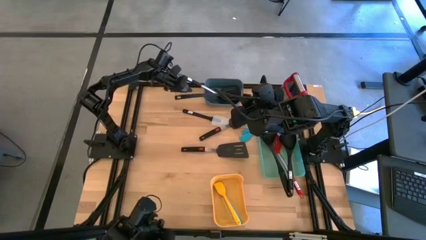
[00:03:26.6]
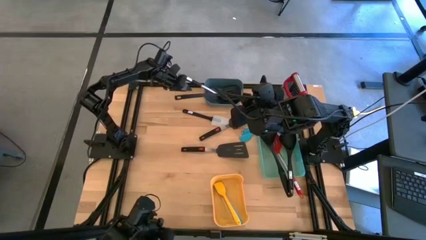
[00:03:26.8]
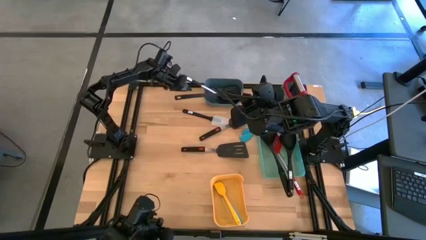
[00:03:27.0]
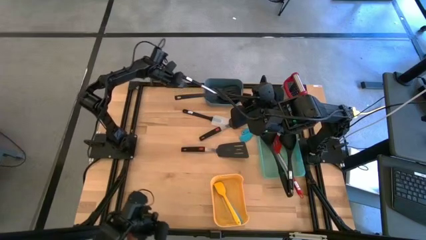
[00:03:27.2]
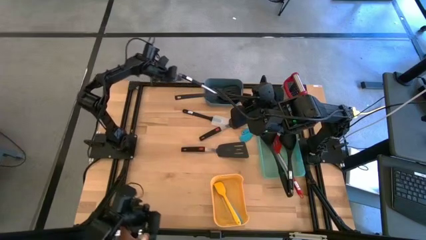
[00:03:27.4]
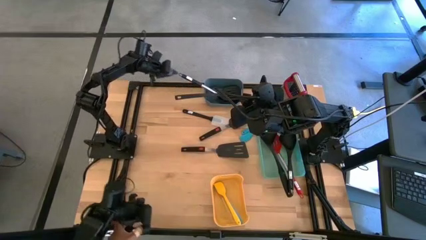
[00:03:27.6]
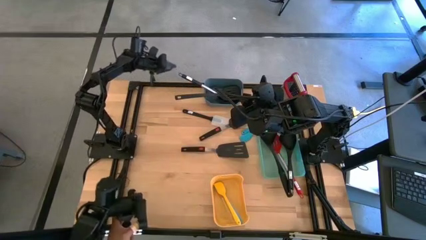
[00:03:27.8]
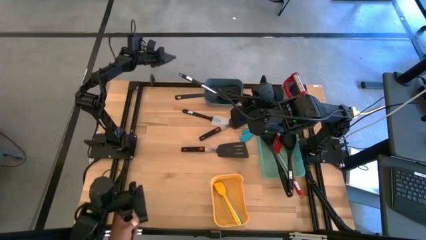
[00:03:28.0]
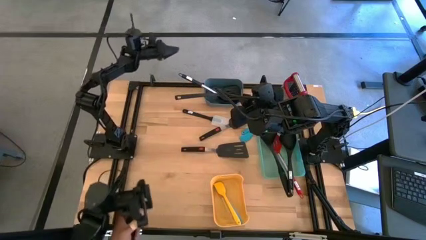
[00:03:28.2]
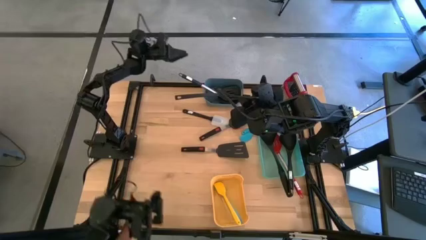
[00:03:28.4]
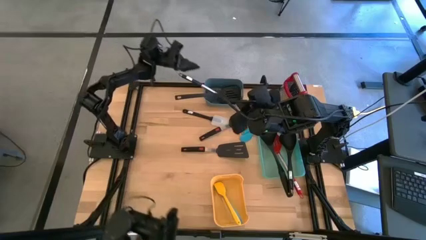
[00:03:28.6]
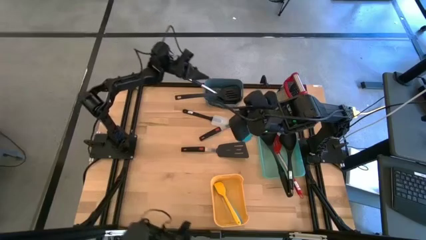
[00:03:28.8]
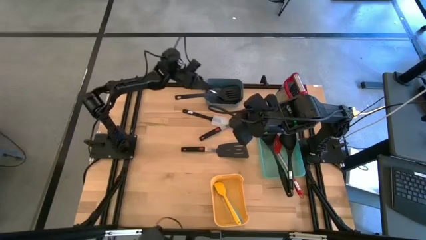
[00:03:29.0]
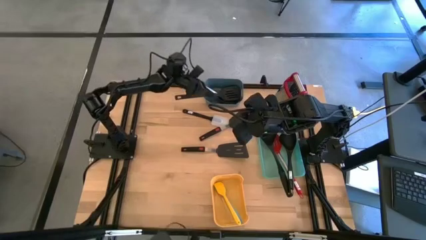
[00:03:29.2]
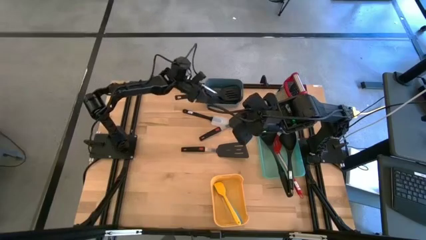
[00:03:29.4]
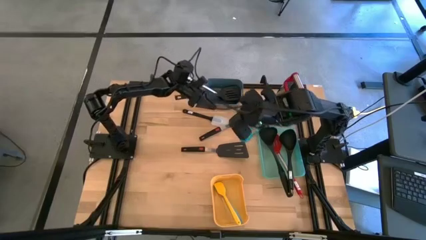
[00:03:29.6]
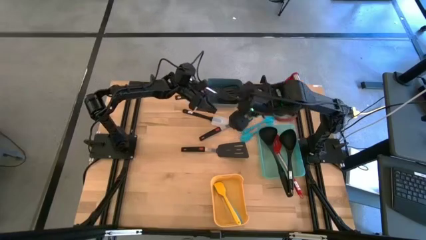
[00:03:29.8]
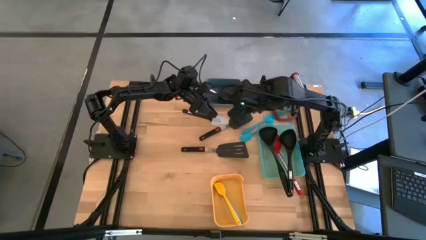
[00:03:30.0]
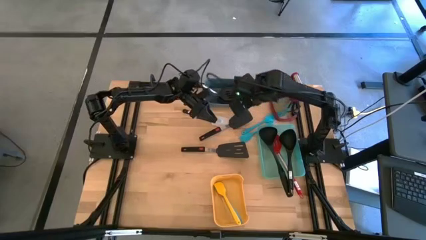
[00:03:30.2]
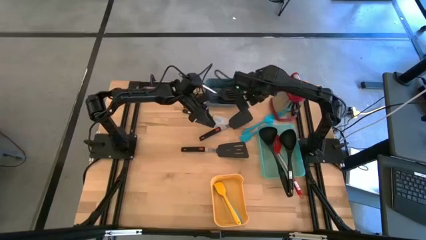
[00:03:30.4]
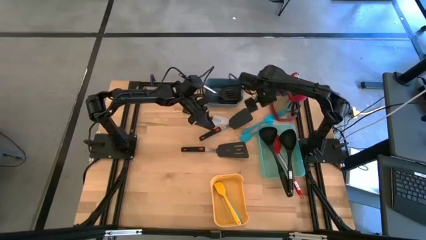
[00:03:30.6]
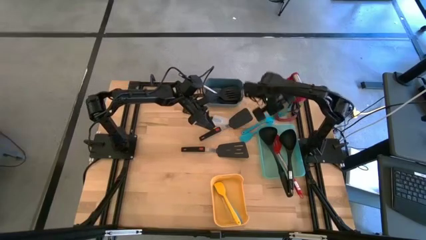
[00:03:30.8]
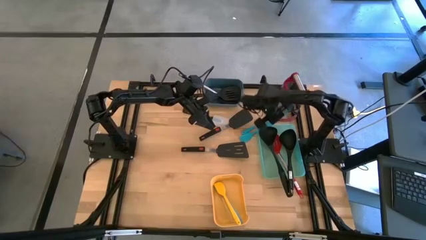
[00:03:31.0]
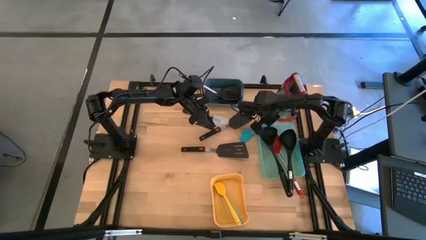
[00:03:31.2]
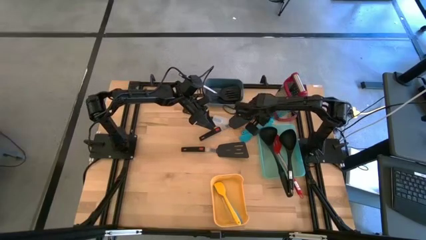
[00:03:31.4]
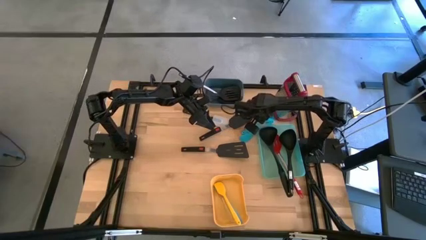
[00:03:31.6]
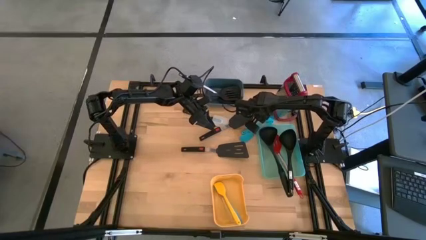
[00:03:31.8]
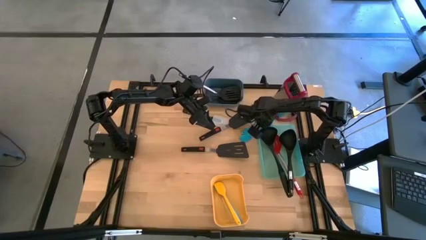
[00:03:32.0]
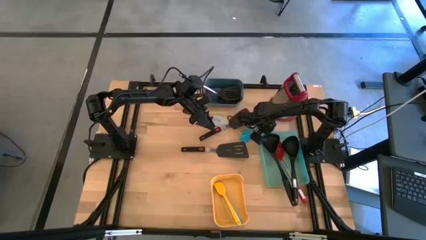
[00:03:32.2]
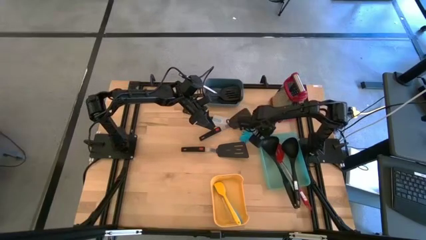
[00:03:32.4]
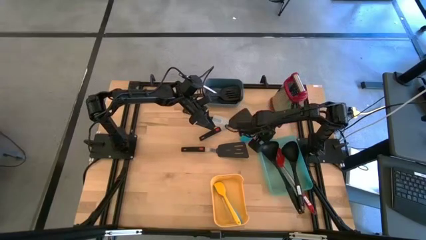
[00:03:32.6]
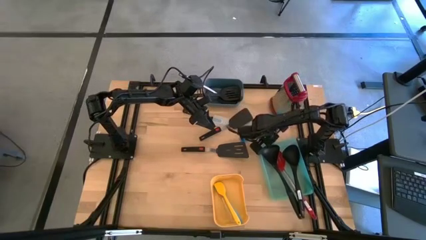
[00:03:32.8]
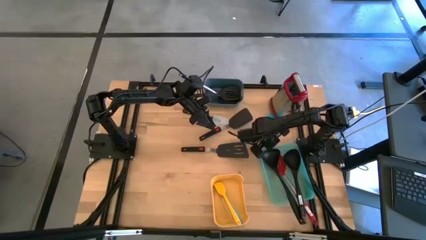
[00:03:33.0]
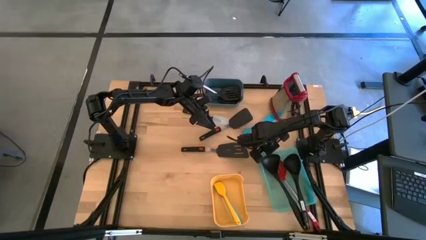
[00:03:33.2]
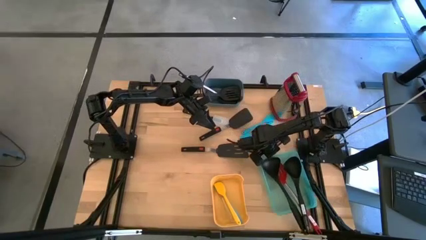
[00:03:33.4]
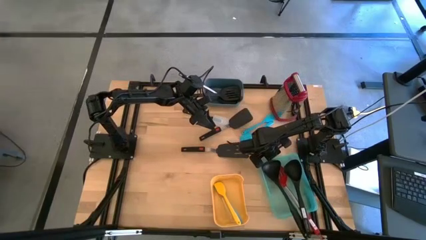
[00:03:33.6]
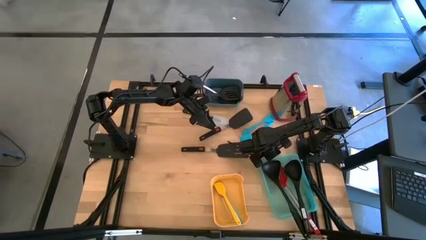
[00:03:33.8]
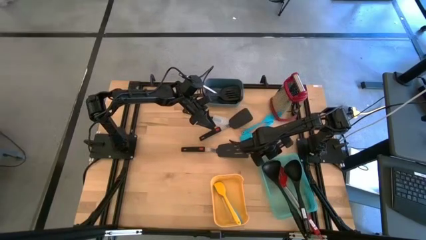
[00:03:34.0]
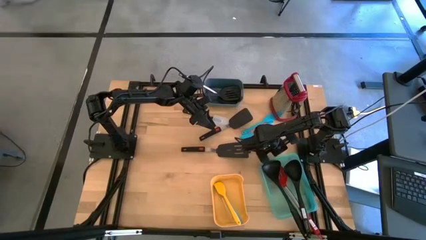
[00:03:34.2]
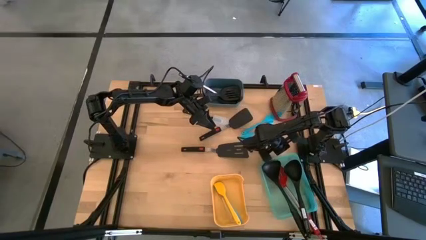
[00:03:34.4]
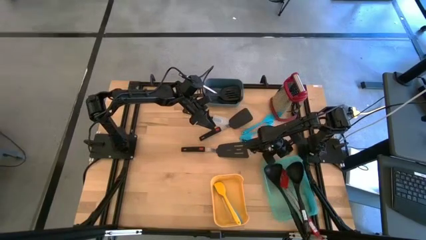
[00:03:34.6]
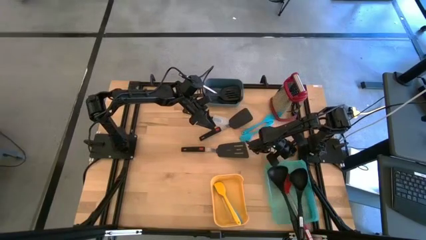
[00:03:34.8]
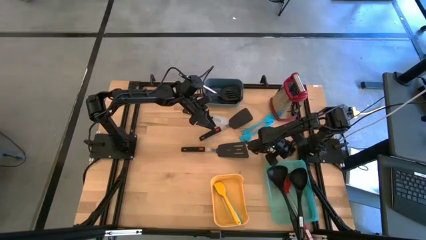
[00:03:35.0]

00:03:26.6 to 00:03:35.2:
Task: Pick & Place Kitchen Items
Adjust the green bin

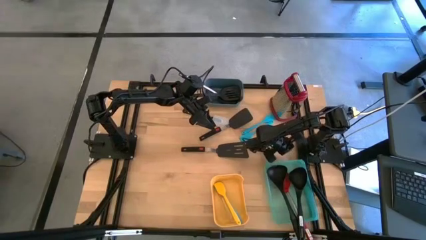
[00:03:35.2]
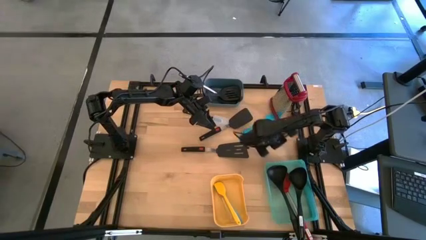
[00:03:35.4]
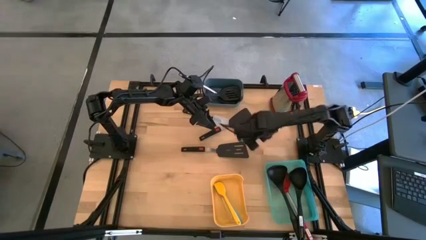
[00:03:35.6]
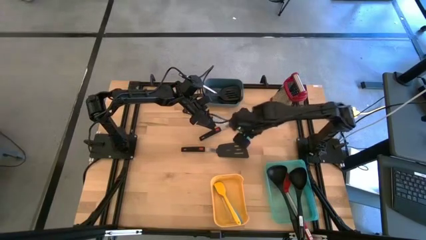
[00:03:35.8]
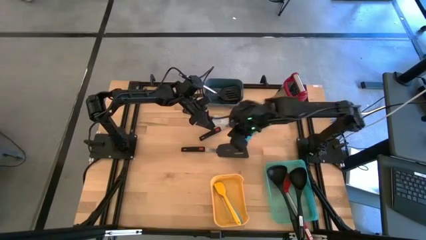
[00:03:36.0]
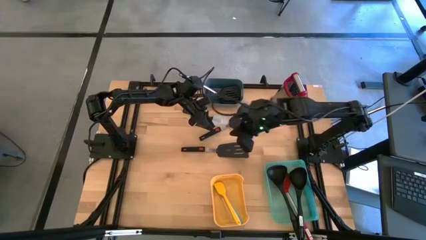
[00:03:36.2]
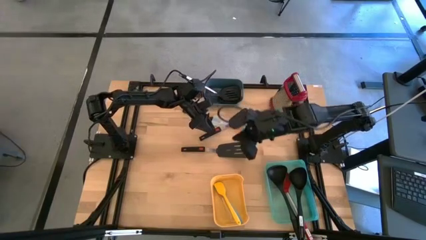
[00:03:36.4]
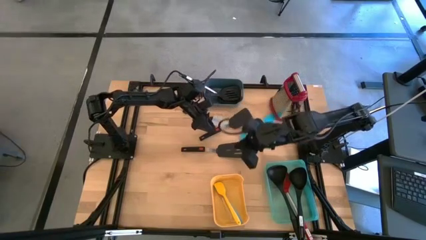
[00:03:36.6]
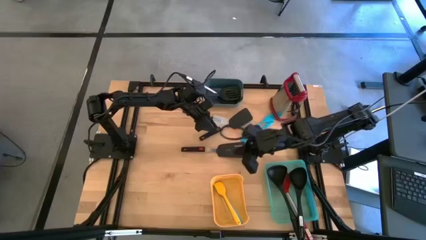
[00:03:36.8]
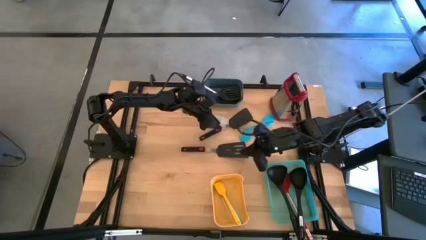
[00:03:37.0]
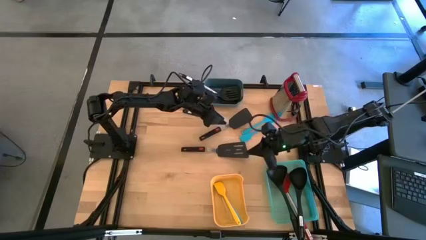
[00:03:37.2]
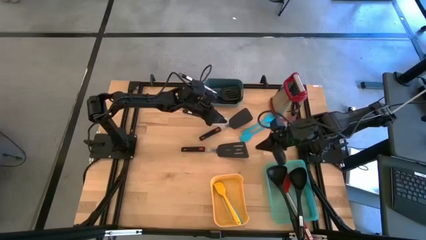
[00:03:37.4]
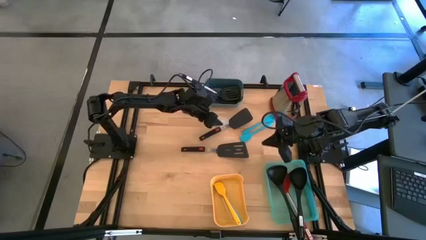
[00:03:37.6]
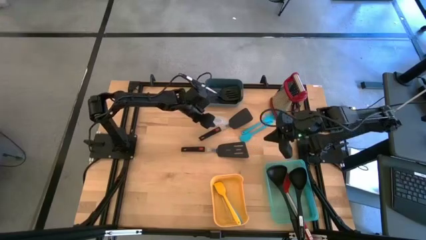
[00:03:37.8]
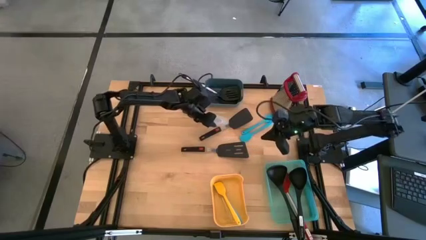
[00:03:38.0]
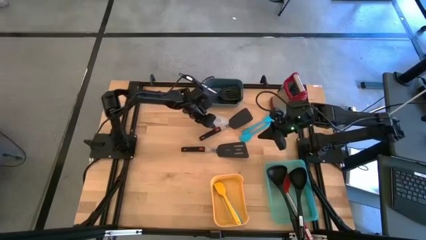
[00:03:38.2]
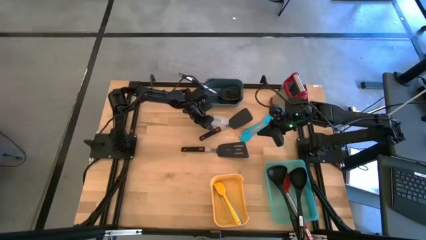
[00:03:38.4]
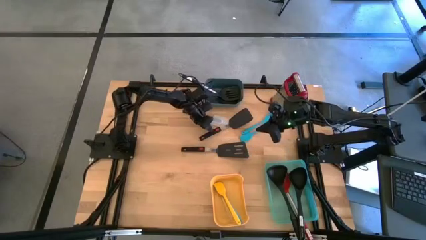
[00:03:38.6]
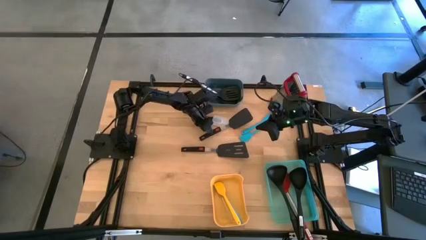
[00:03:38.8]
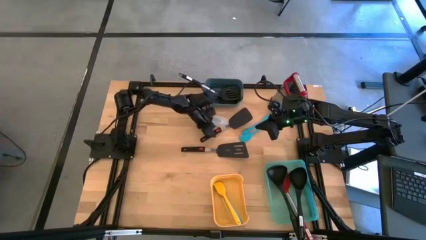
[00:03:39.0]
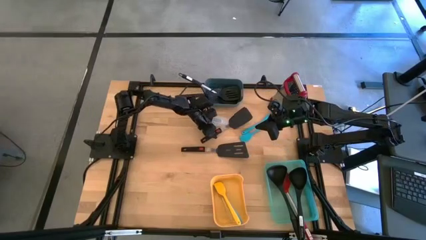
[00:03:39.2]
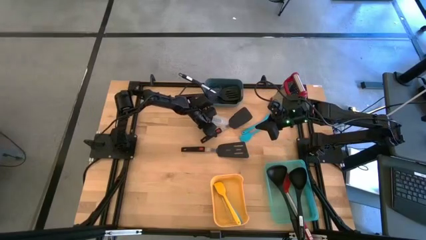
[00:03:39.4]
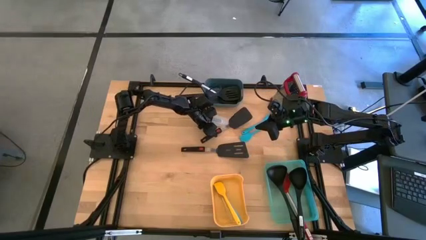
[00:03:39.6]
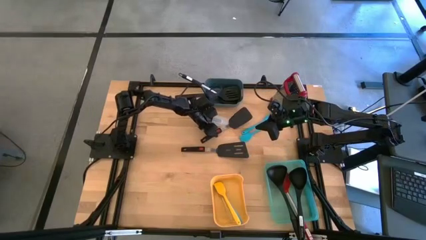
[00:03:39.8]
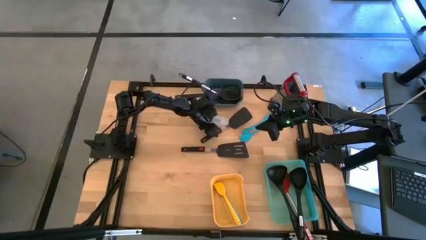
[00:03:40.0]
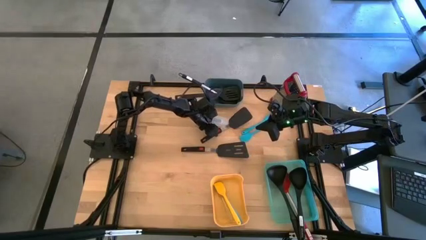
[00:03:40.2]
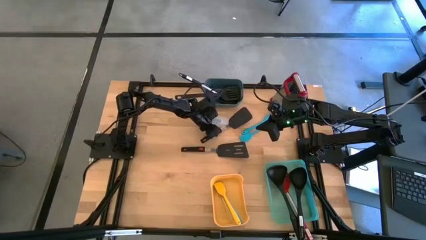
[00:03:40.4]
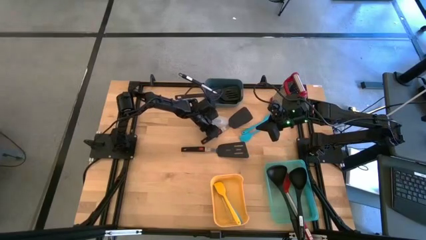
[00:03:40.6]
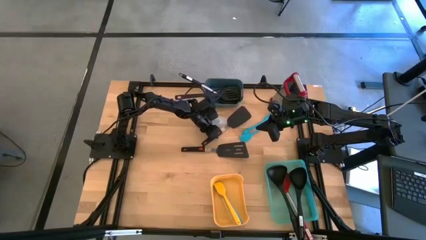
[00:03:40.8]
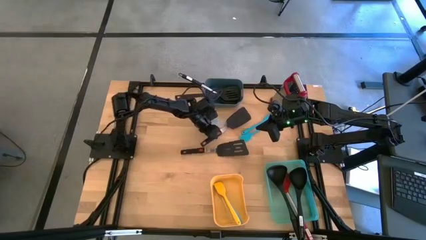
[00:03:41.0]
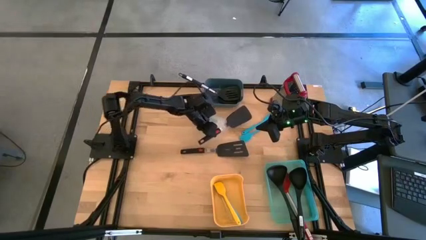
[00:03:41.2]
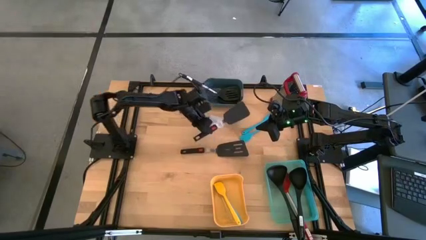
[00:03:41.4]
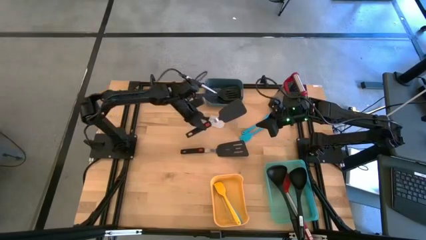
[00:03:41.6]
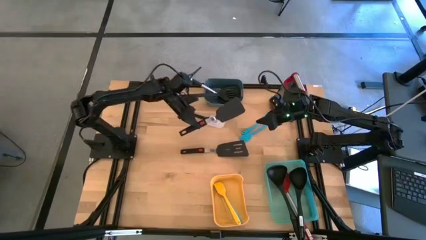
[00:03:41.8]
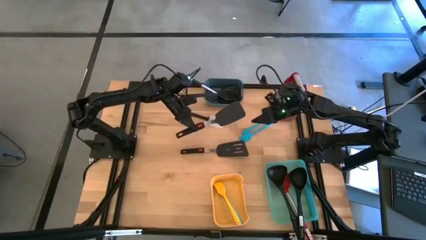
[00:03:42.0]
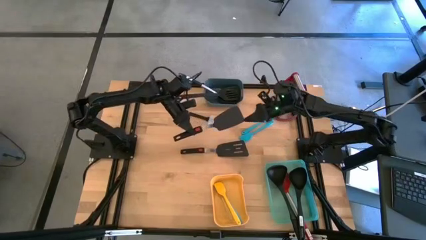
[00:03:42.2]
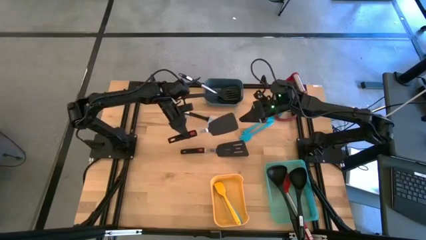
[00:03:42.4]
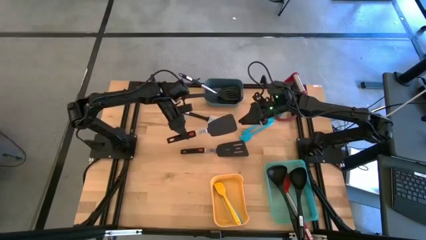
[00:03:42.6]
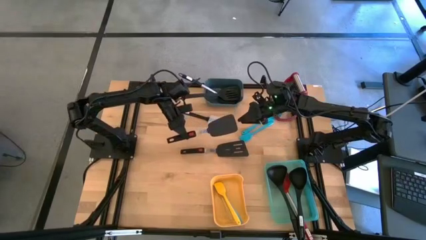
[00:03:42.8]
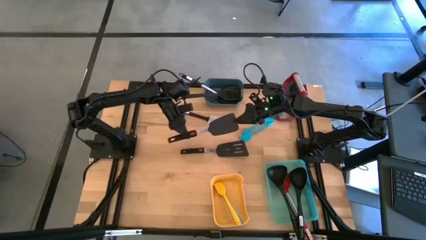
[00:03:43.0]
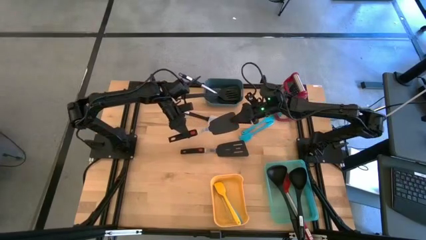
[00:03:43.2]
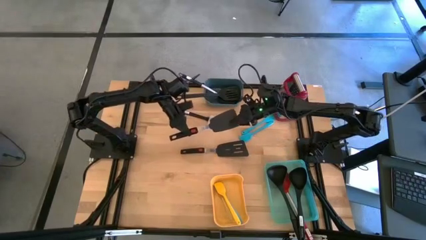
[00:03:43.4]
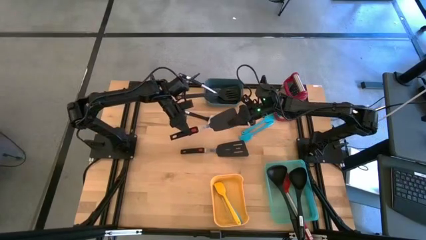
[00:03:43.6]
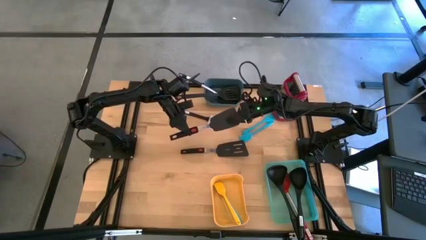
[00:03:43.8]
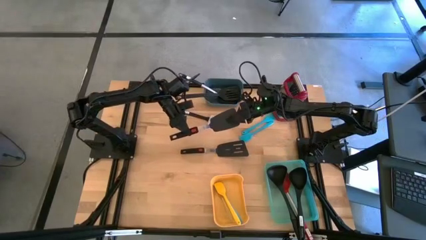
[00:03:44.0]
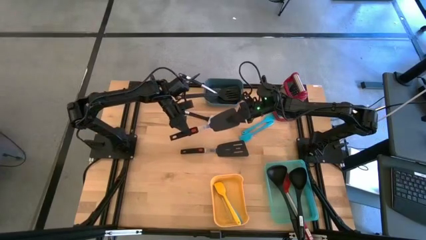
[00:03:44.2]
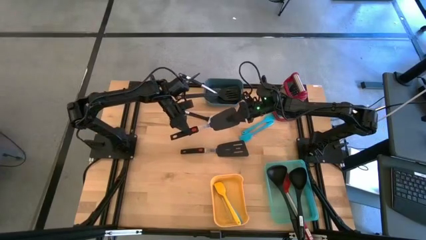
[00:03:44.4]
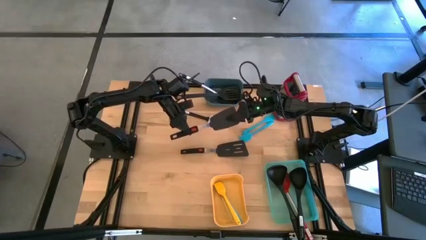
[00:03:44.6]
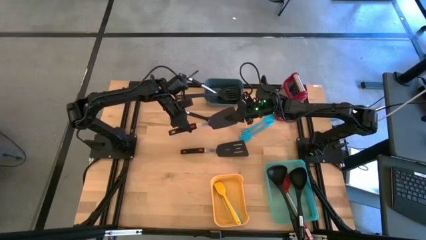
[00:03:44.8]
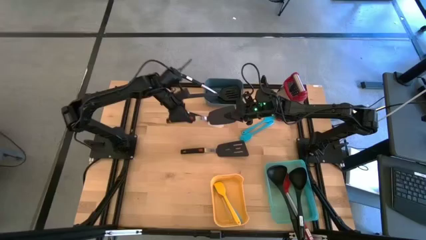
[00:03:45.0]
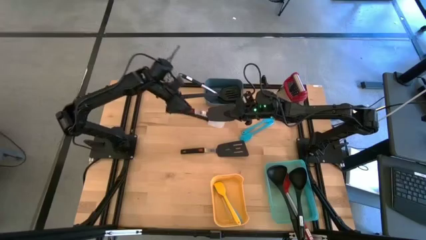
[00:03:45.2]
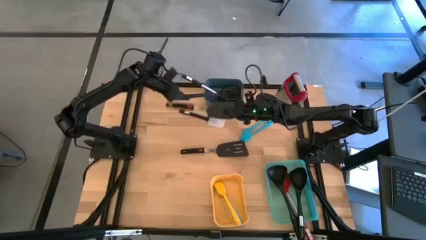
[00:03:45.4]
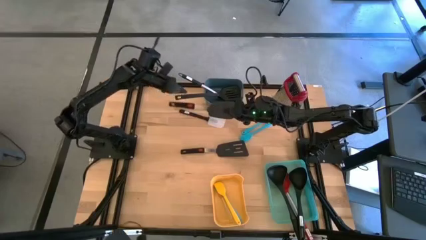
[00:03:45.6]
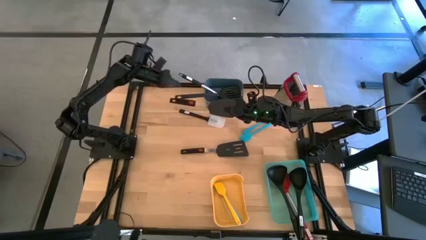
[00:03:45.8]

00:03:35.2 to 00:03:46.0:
Put the large black spatula into the blue bin
